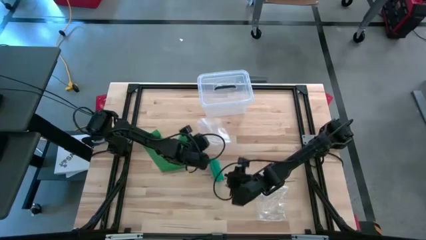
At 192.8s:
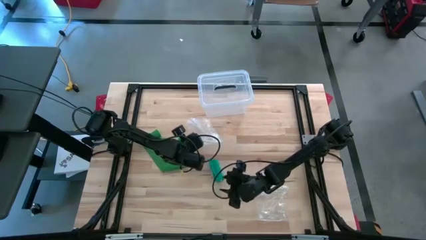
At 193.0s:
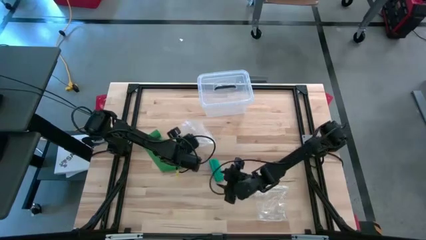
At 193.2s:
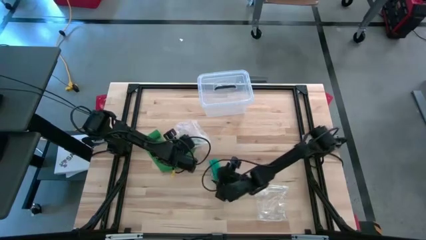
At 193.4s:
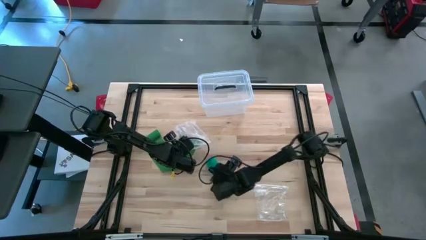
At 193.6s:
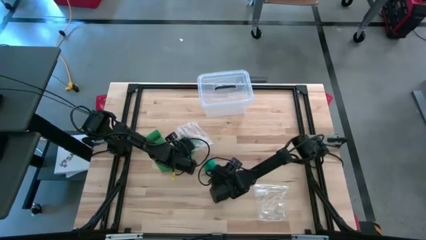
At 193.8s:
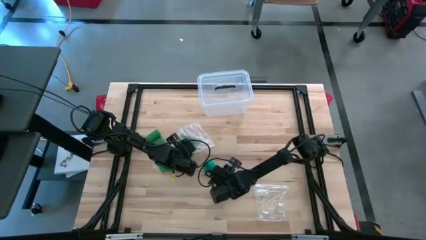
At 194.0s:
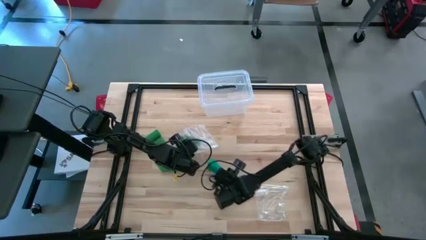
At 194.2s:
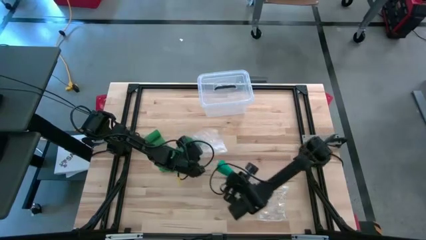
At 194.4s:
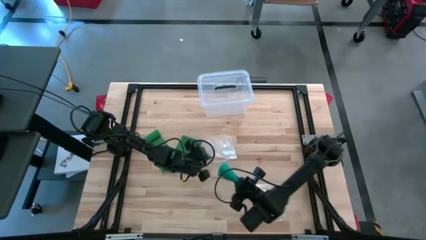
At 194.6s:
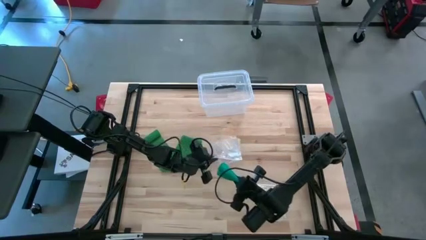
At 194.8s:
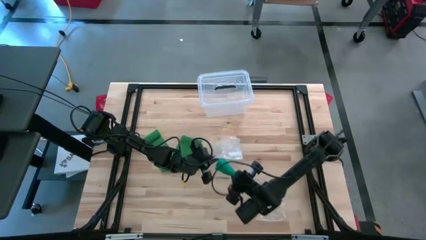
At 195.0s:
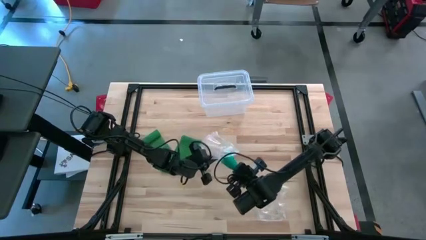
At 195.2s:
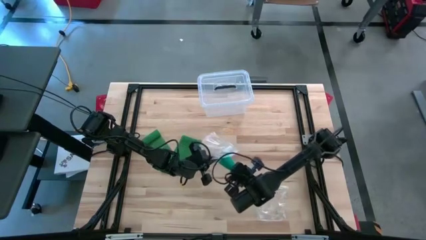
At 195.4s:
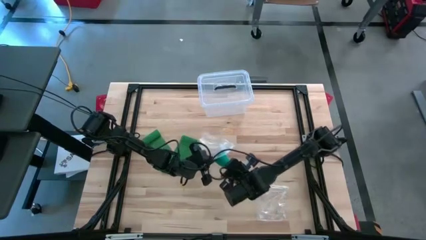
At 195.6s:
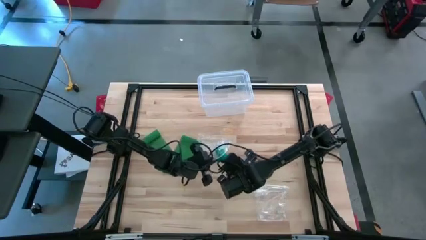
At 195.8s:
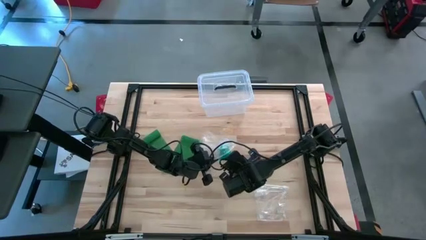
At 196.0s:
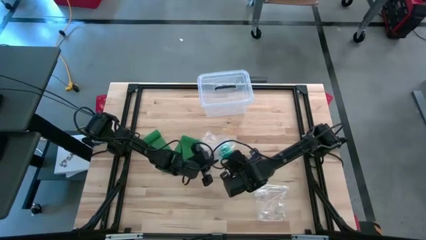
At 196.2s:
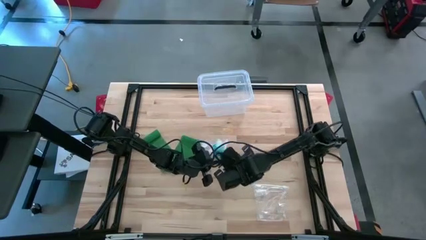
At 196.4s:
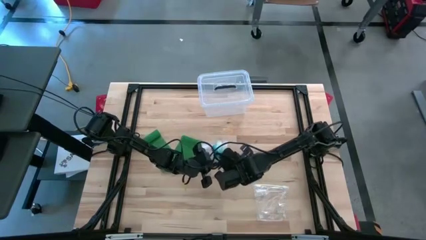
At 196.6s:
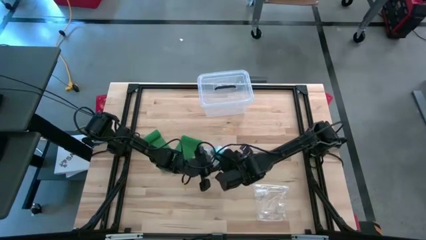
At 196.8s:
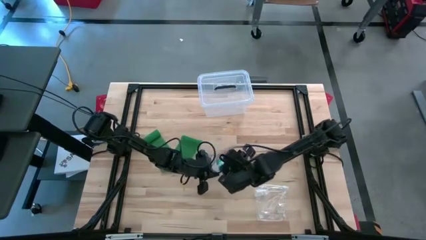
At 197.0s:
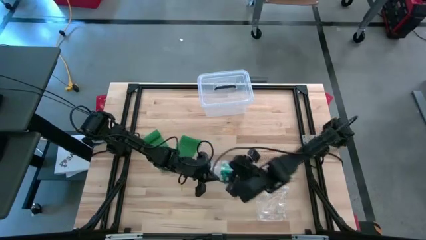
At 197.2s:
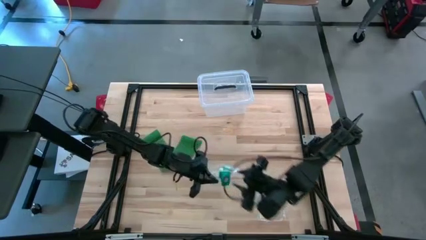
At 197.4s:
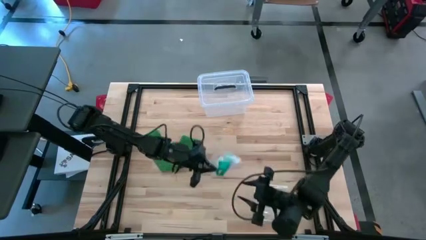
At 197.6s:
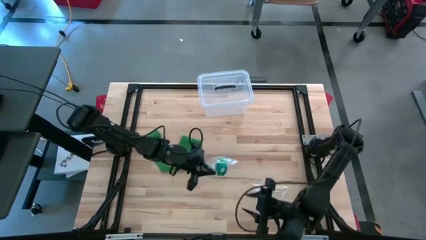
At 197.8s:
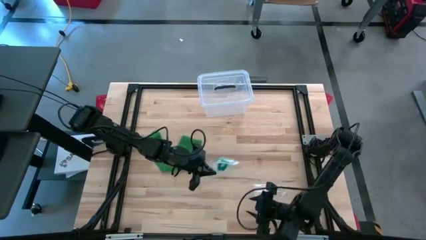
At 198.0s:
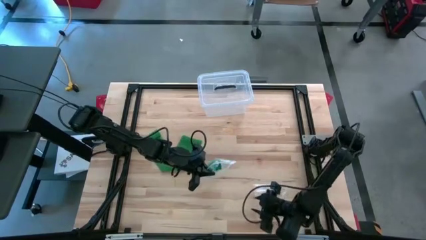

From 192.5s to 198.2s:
Task: Roll bandage
Put the rolled blue bandage into the transparent zip bag

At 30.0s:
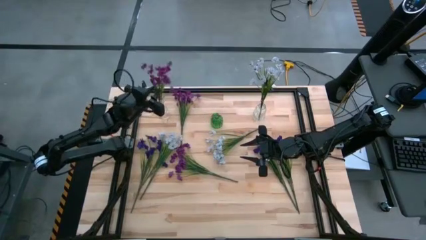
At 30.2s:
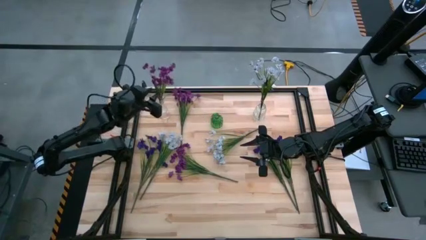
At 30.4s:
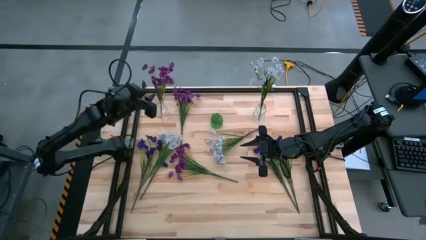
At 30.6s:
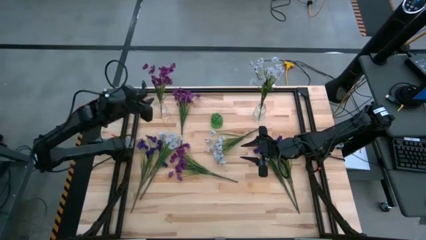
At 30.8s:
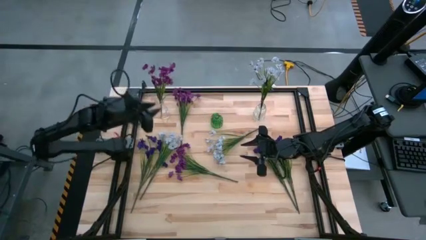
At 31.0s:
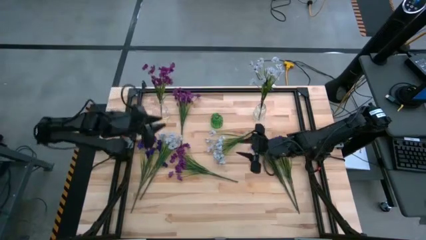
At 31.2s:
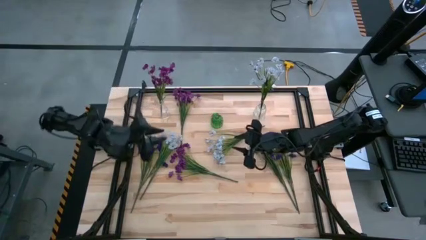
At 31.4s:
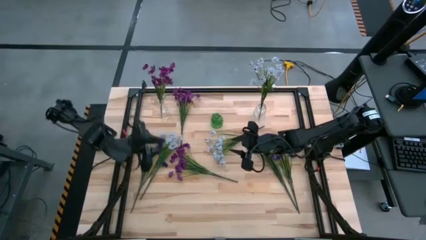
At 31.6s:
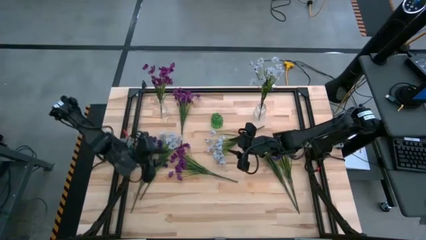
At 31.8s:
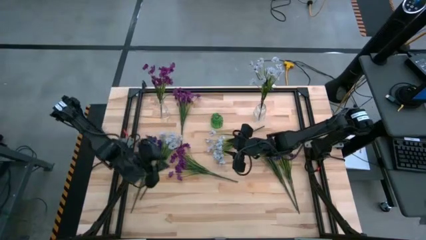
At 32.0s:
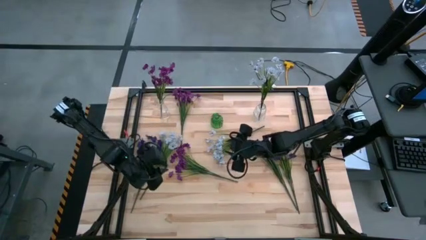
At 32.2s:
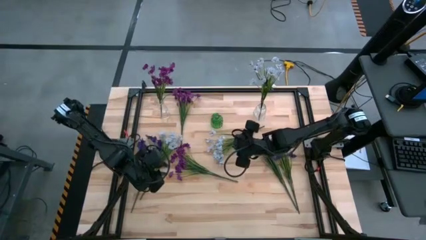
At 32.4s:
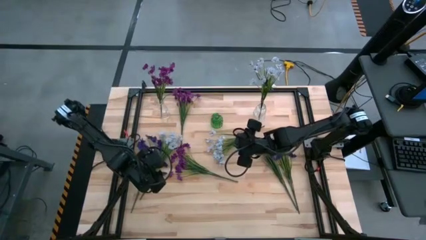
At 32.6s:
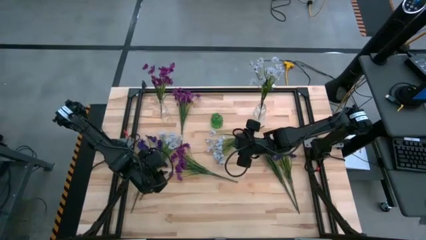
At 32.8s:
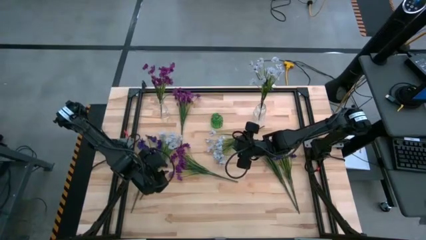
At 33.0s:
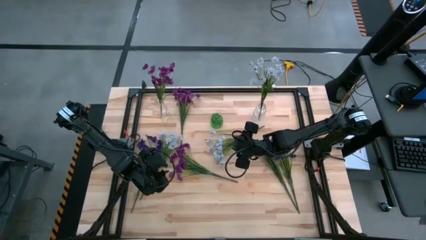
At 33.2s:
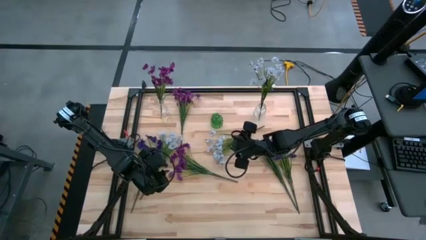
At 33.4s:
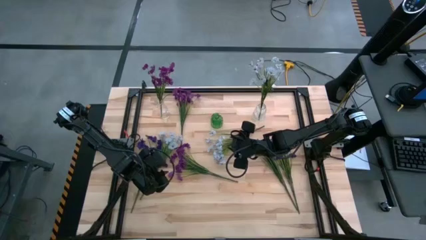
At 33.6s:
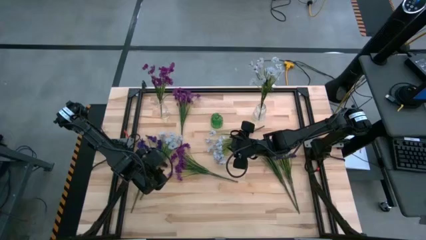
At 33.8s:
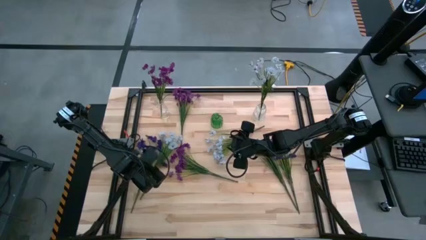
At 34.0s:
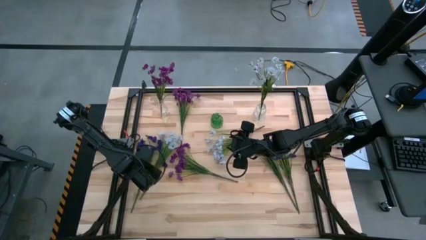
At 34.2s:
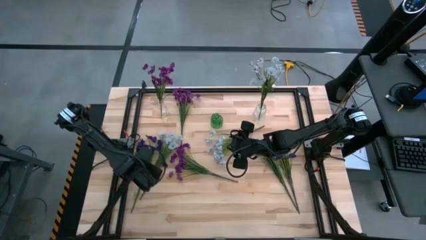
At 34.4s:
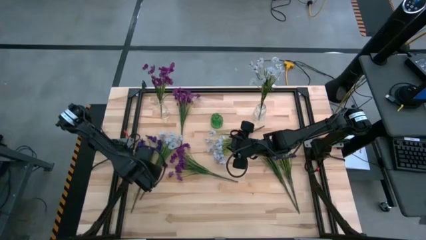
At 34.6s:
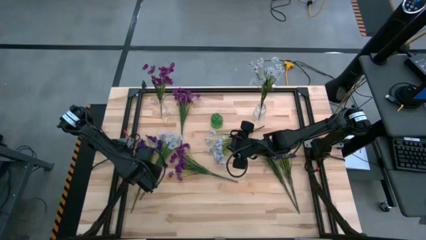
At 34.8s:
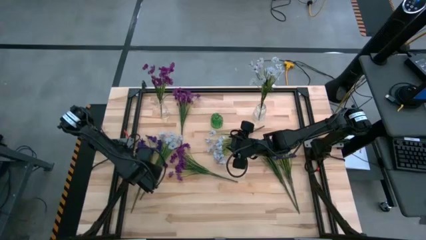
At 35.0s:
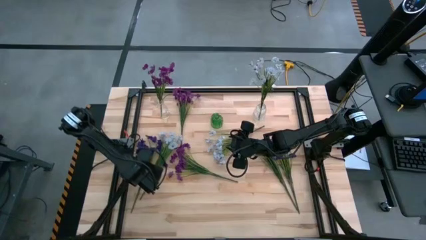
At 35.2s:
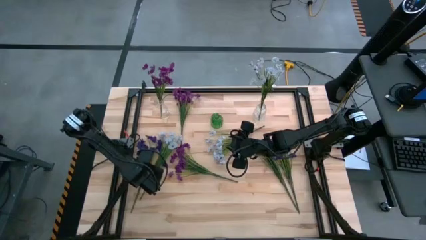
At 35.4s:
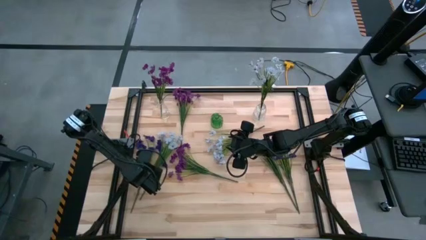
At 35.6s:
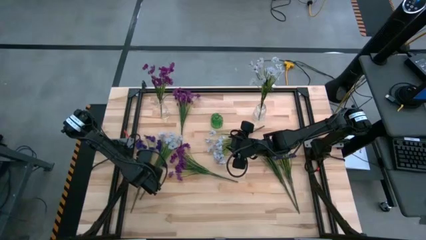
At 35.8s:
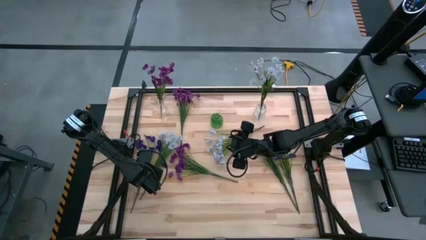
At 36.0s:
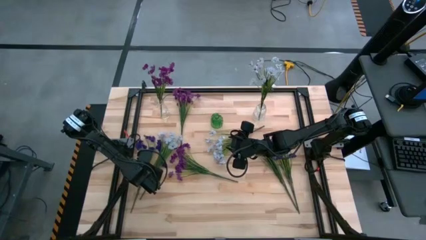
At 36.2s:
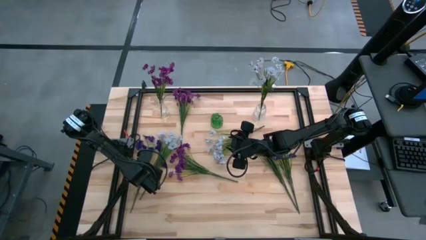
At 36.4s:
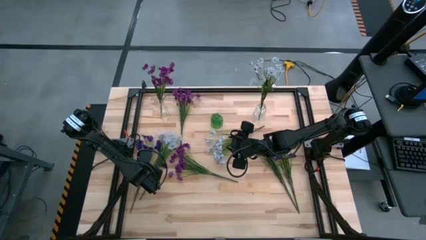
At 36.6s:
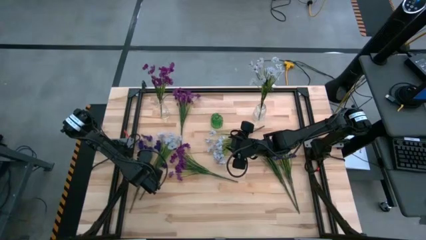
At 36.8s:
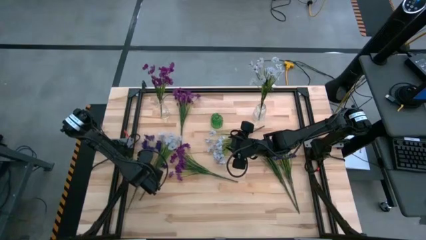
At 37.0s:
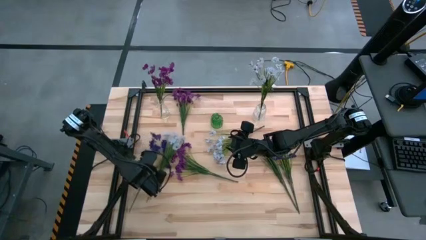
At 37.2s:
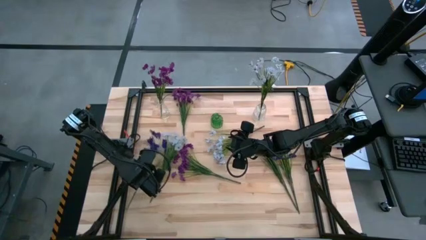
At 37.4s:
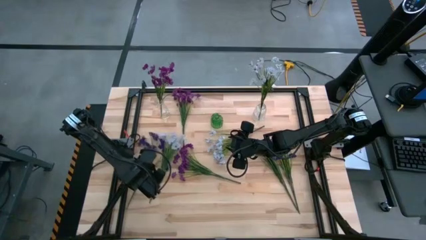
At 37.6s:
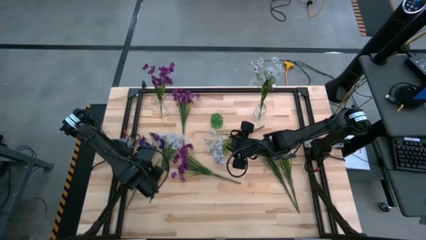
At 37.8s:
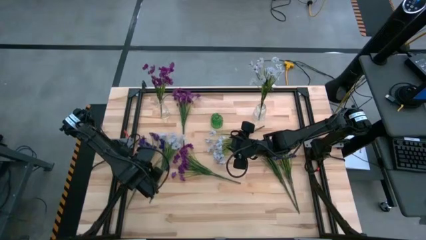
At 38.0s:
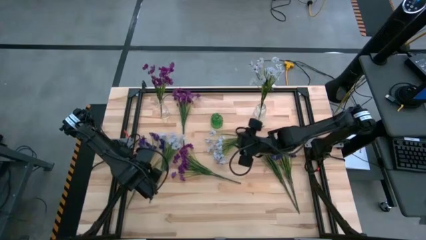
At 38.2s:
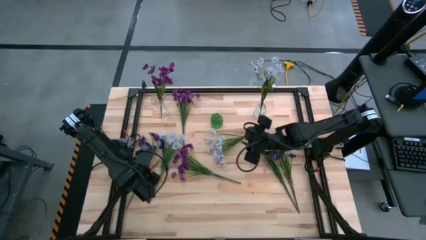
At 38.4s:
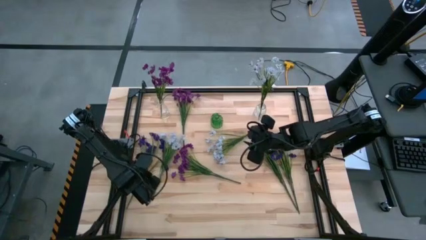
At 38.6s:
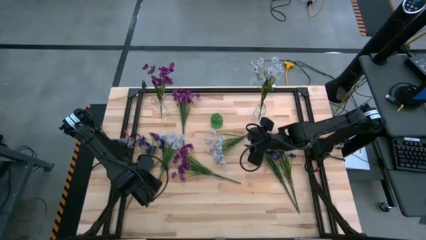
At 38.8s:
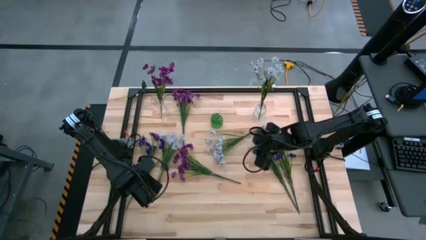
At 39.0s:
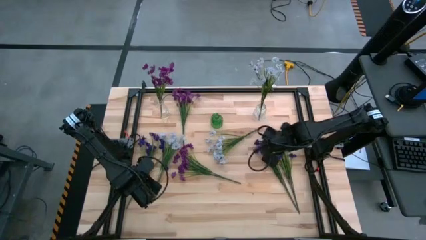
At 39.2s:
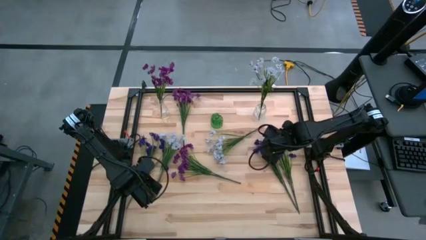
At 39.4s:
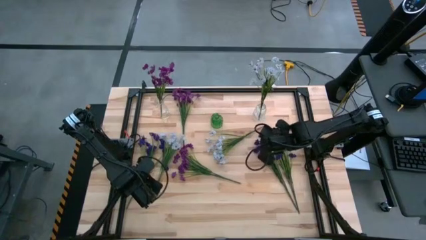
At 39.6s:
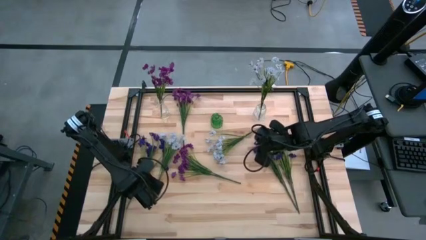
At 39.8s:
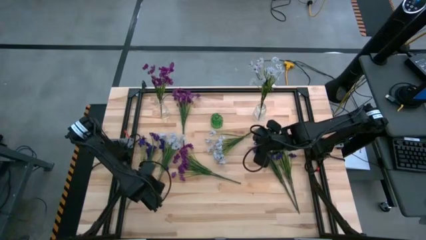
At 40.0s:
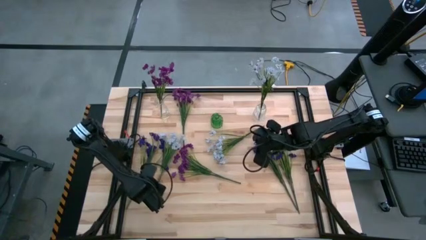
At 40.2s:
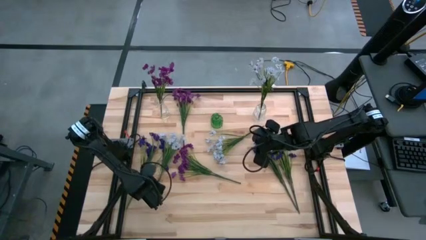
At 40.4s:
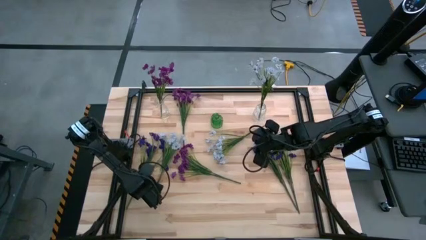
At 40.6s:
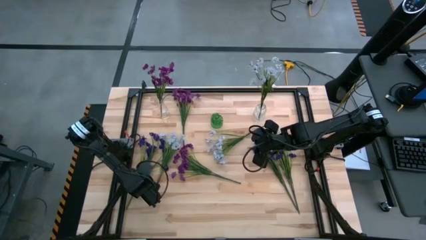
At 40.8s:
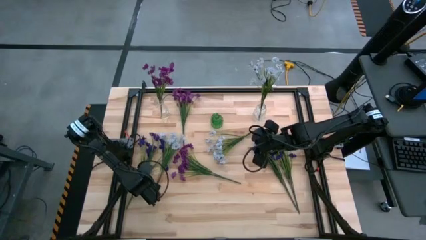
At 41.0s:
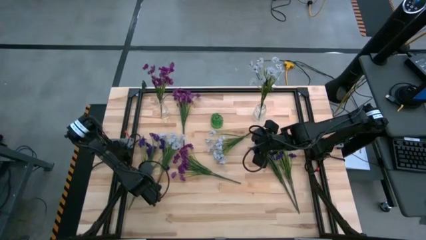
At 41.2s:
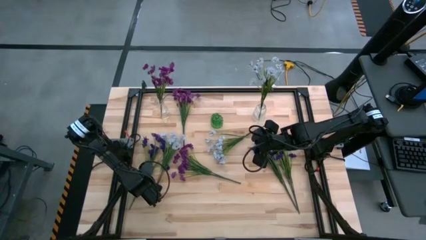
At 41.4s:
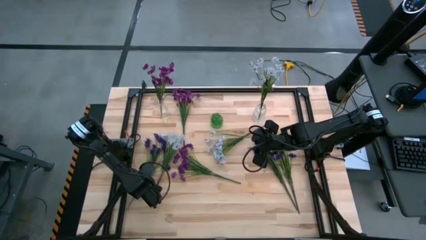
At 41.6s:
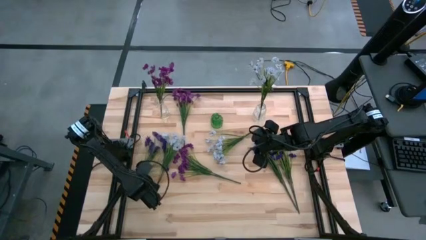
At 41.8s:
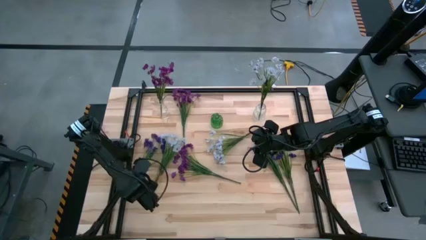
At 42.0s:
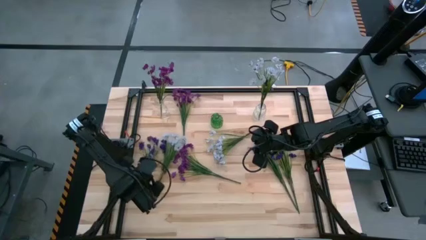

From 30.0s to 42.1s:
Task: Sort flowers into vase by color
Put the left blue flowers into the green flower vase
